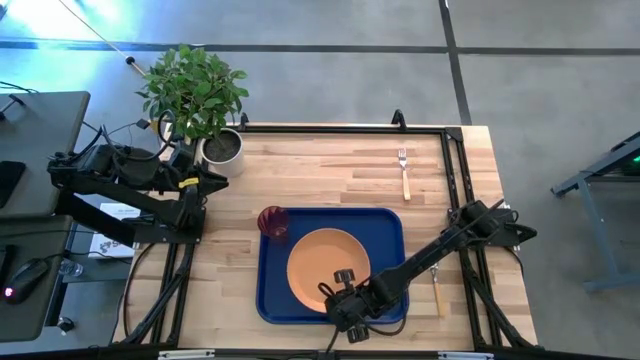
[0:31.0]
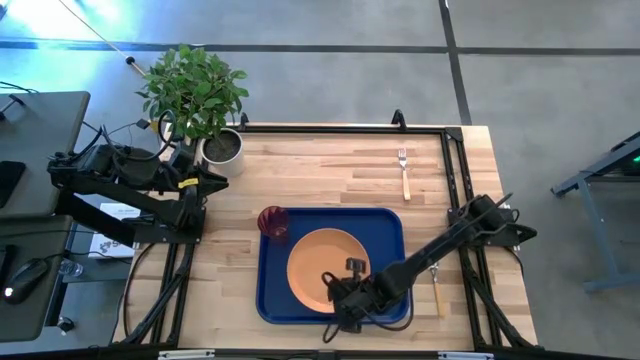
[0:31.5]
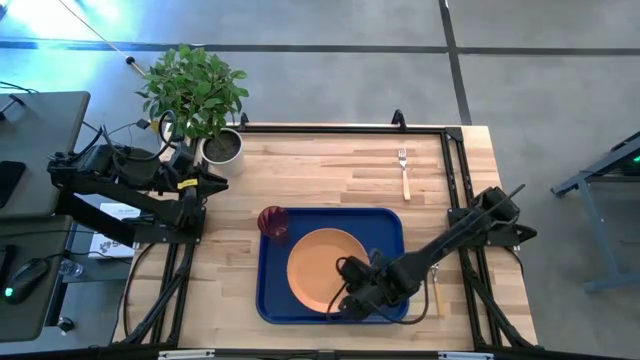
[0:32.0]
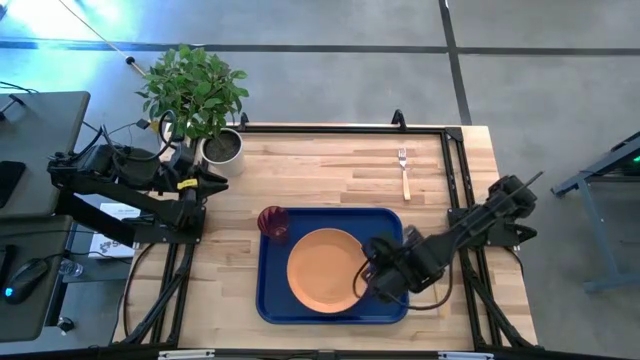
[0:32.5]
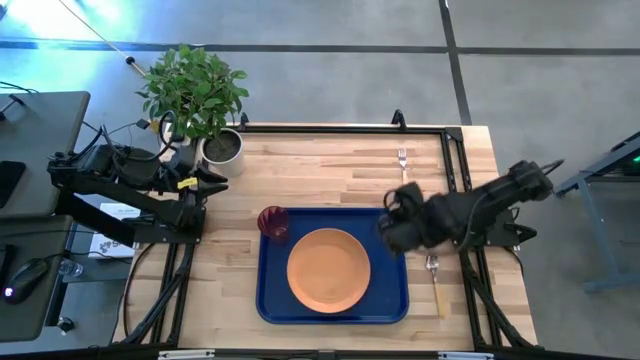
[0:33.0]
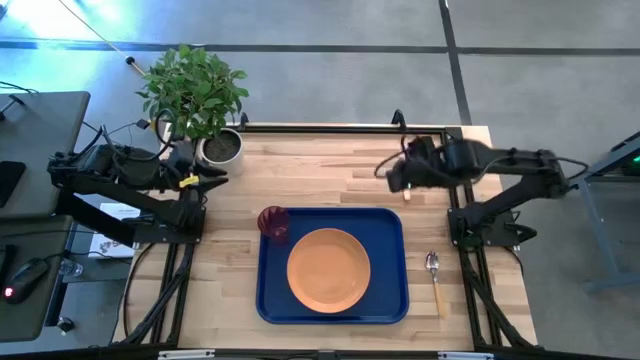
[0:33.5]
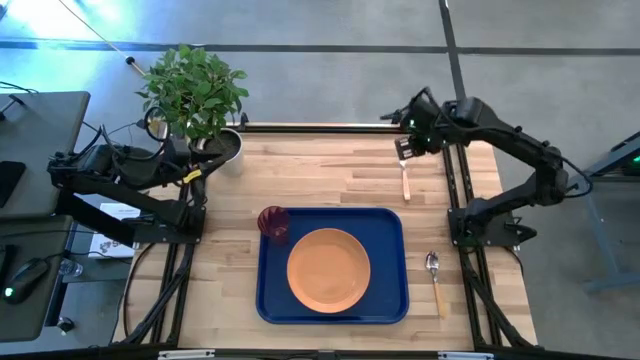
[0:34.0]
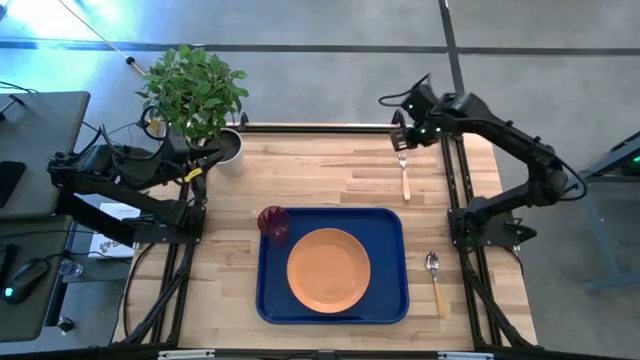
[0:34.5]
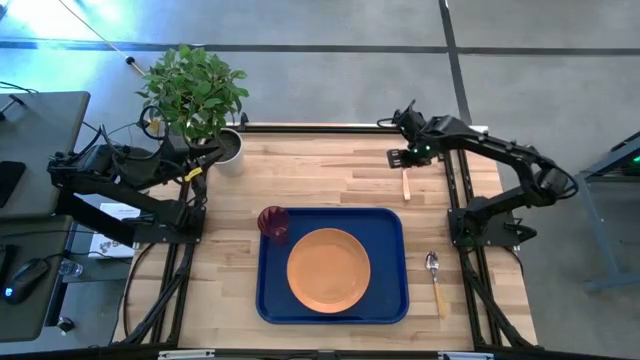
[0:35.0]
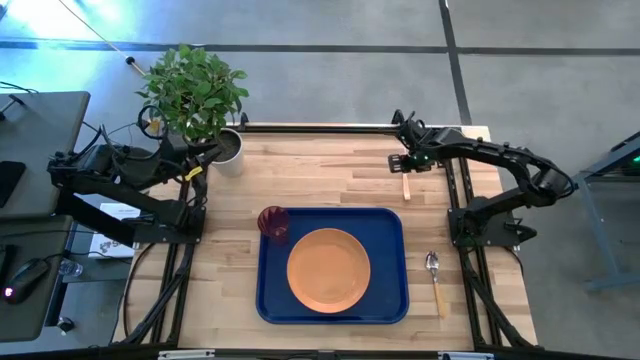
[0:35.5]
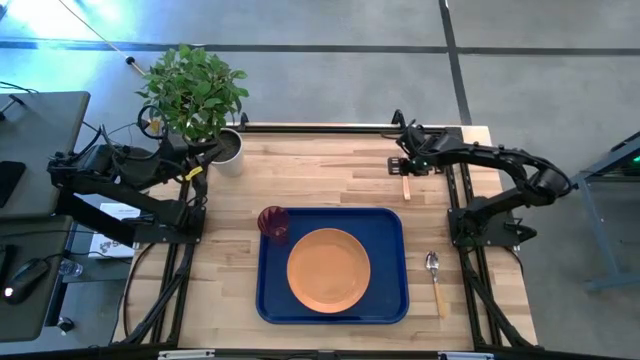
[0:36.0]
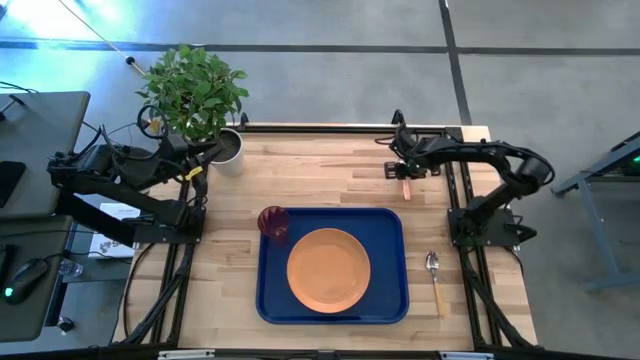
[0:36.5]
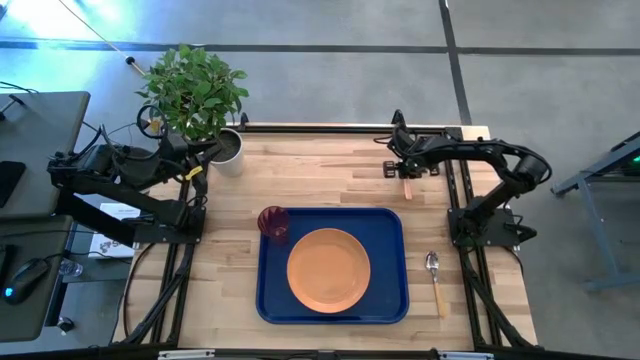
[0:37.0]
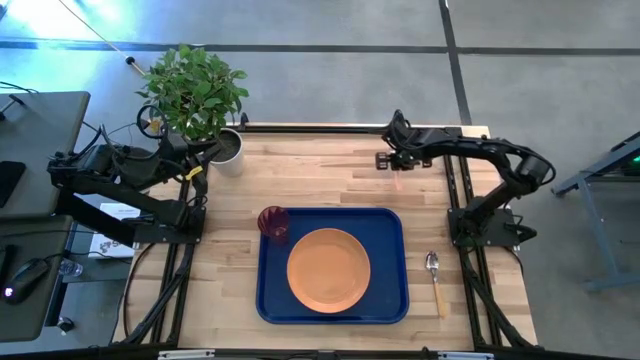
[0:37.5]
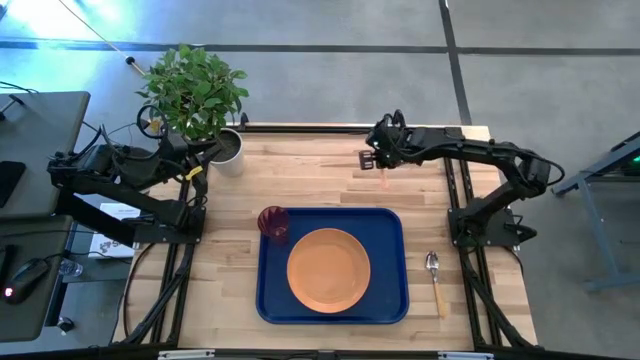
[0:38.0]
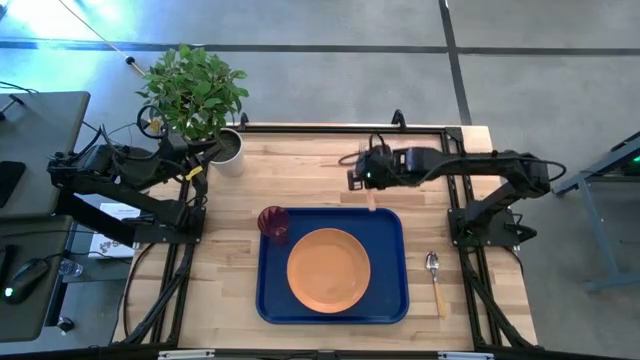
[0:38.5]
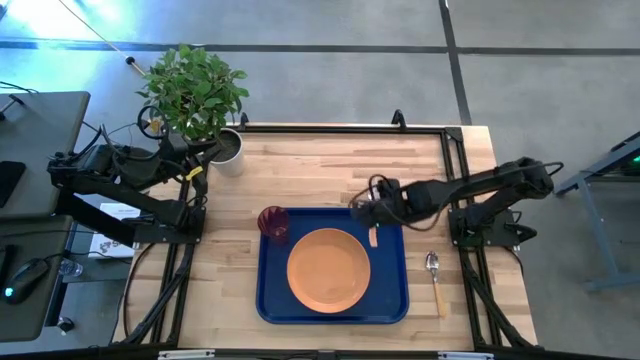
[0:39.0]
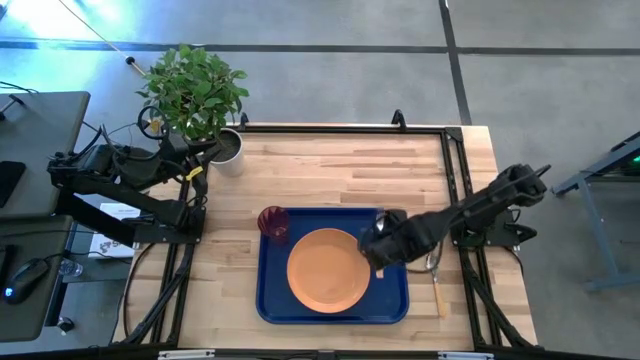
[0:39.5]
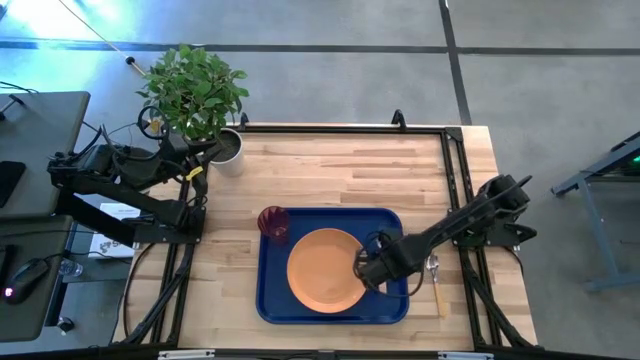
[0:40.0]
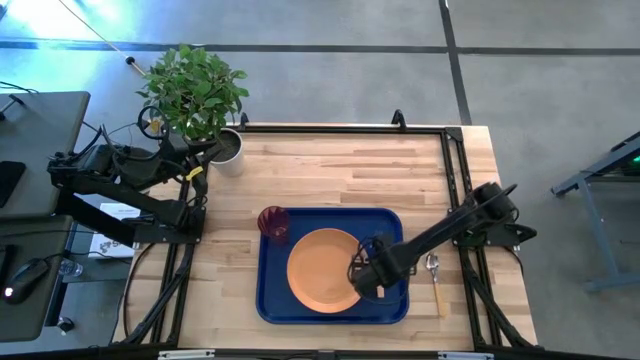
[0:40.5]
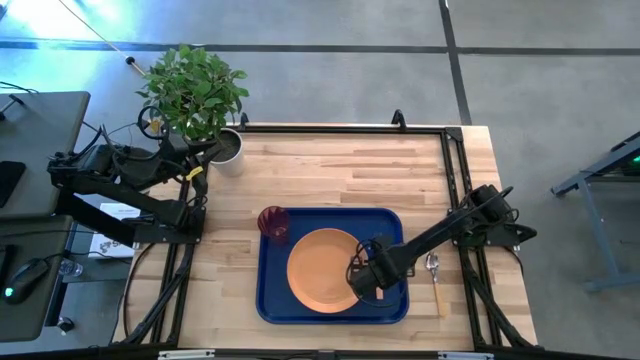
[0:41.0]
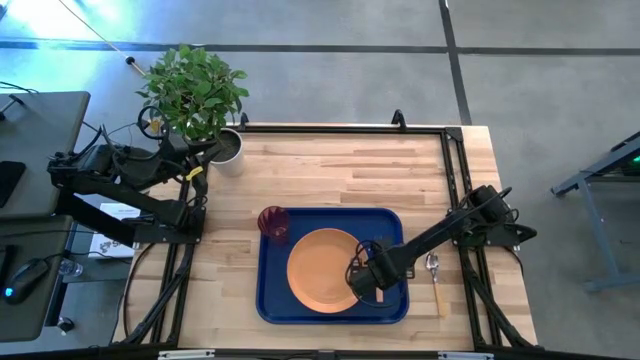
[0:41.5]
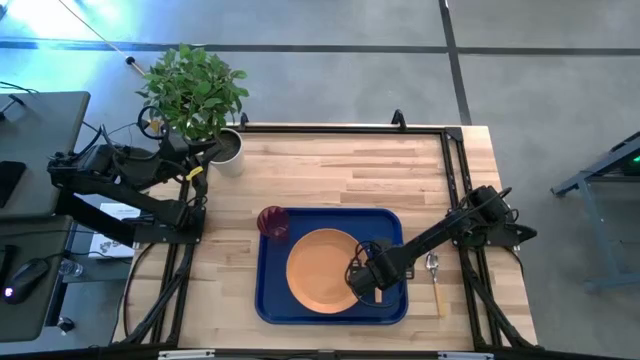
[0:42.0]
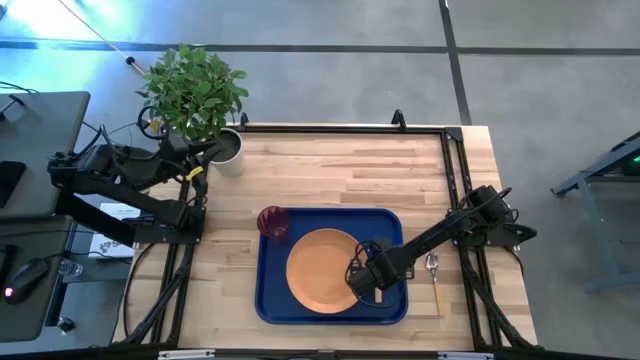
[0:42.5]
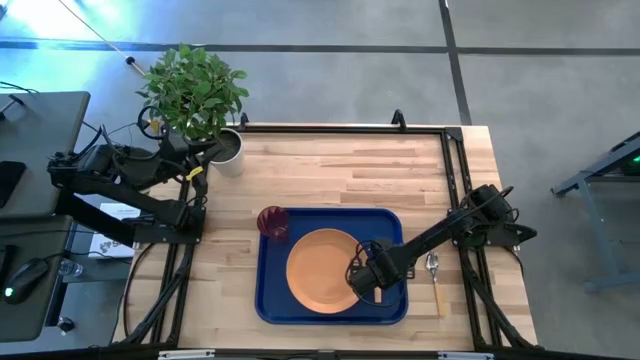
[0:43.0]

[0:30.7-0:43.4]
Task: Pick and place plate/cup/fork/spoon on tray
Put the light orange fork on the right side of the orange plate

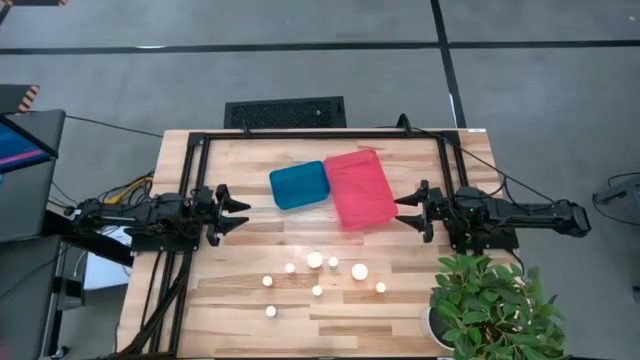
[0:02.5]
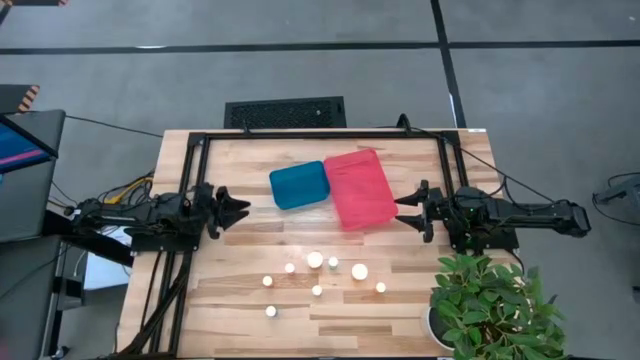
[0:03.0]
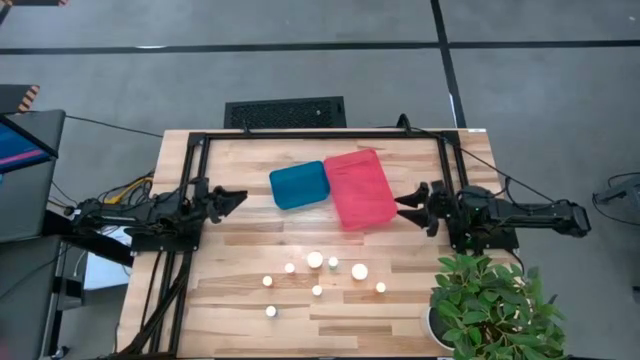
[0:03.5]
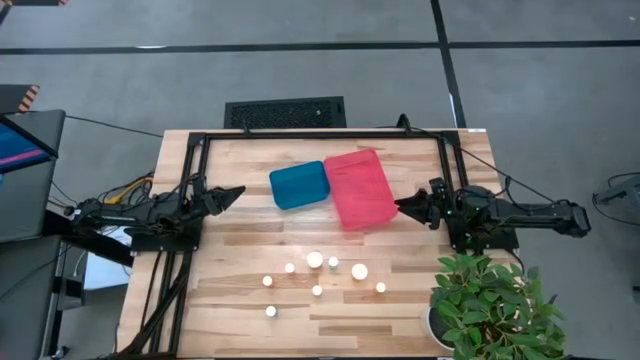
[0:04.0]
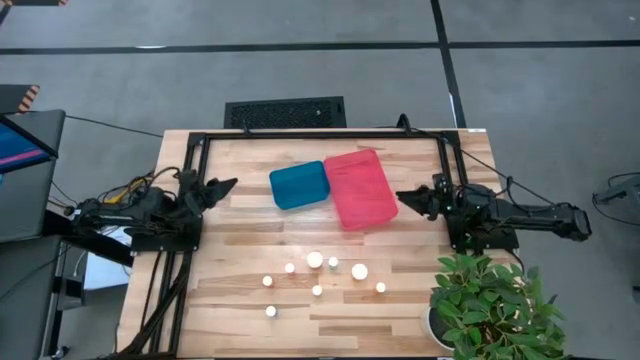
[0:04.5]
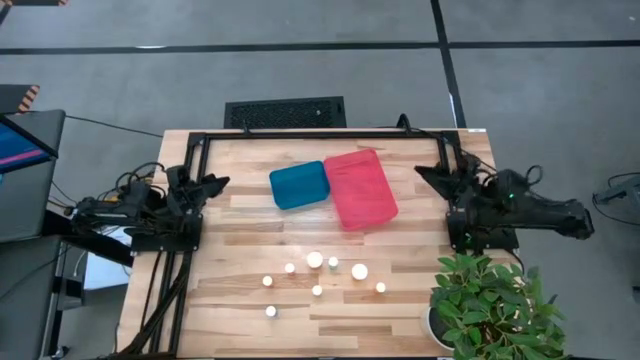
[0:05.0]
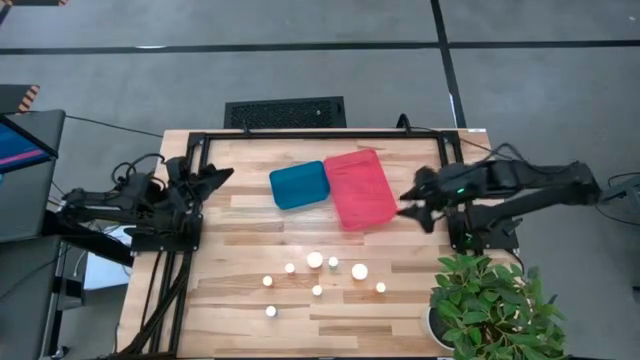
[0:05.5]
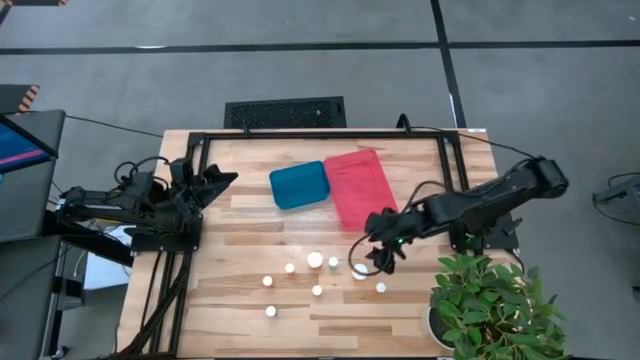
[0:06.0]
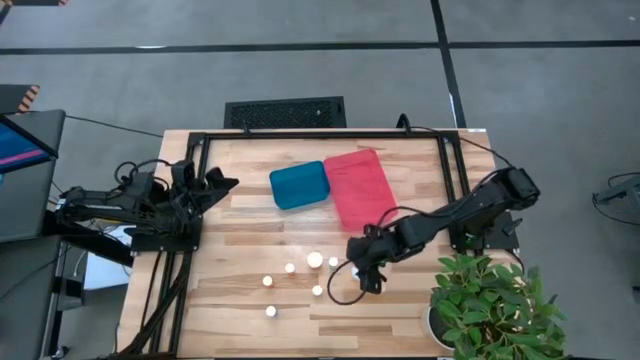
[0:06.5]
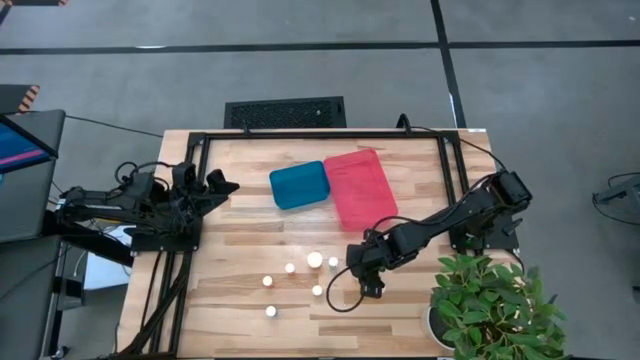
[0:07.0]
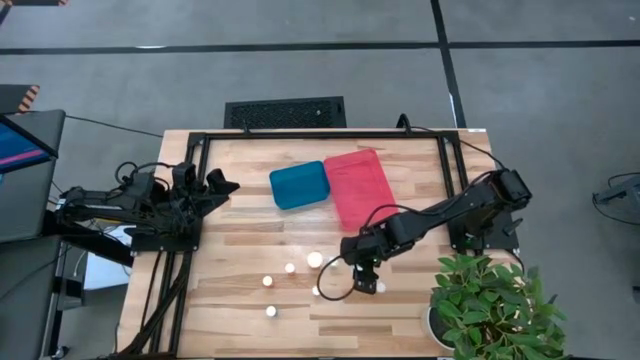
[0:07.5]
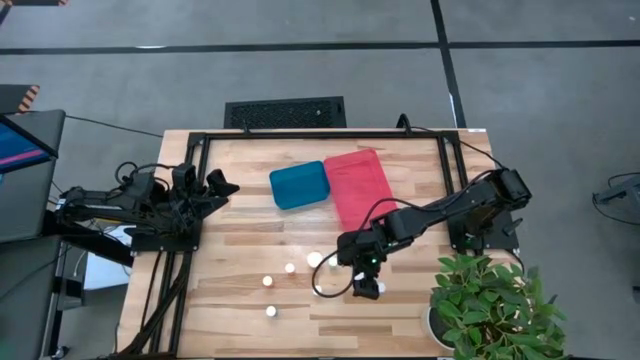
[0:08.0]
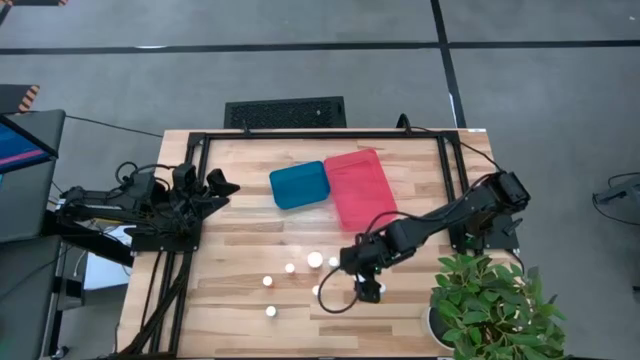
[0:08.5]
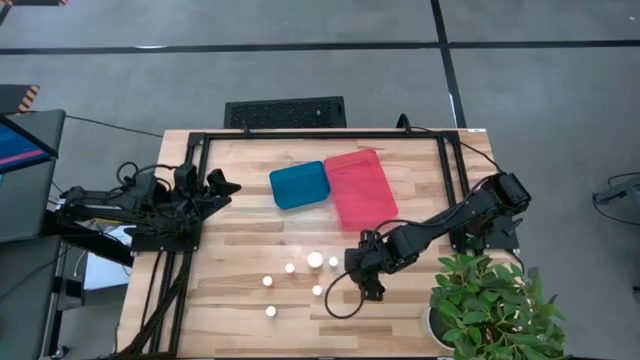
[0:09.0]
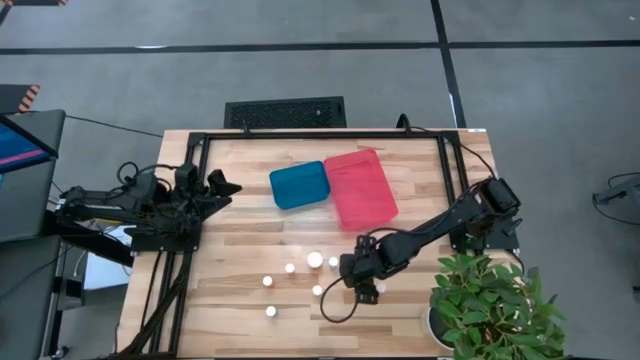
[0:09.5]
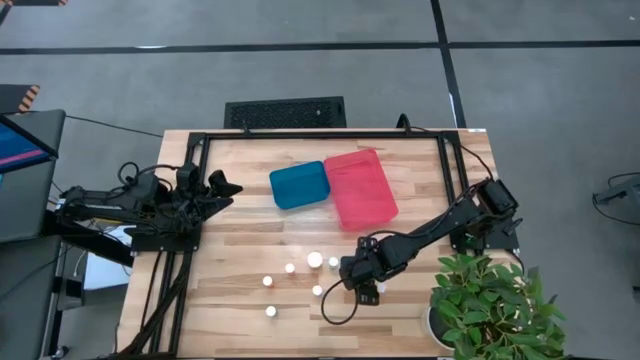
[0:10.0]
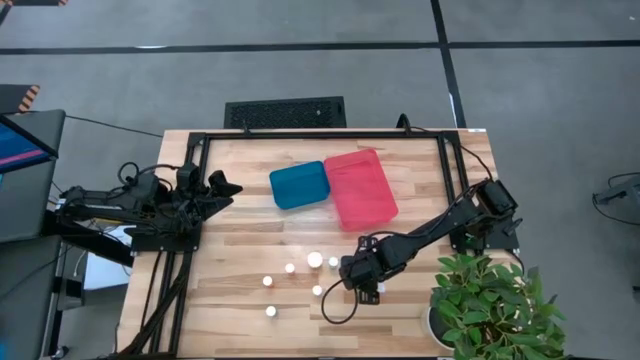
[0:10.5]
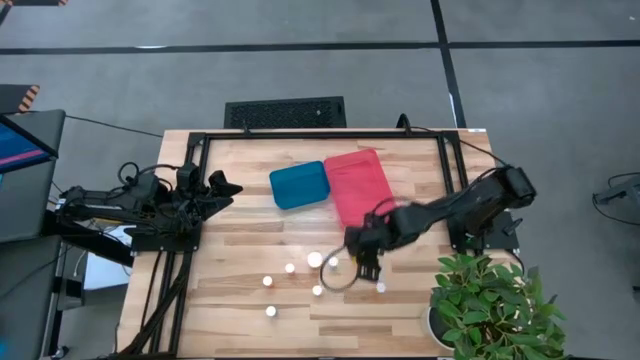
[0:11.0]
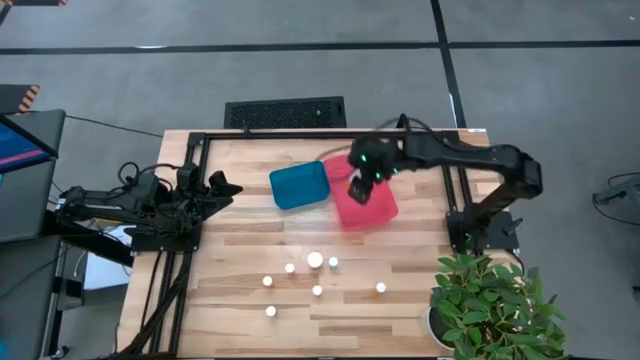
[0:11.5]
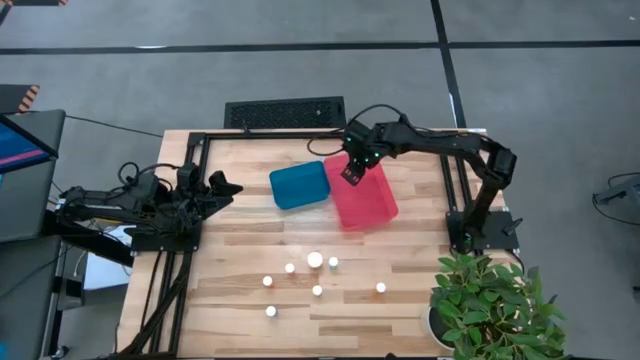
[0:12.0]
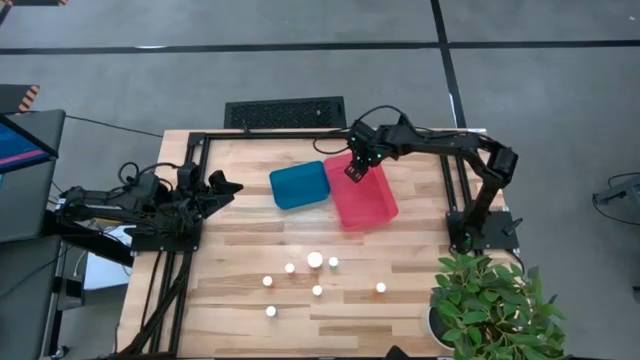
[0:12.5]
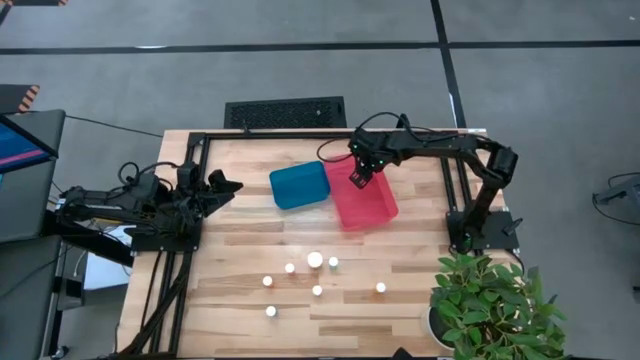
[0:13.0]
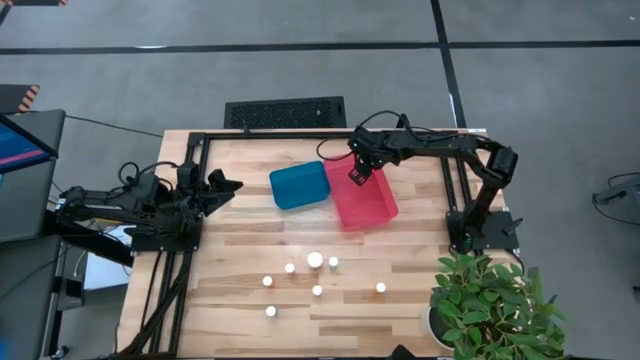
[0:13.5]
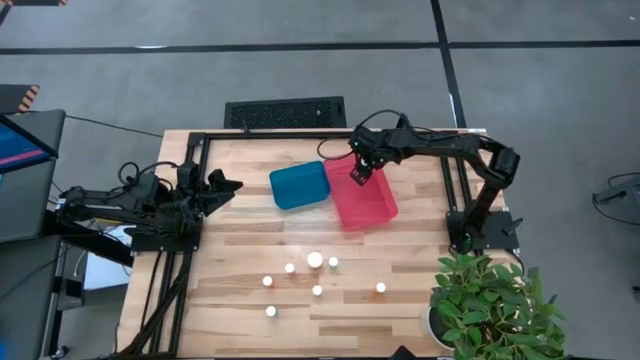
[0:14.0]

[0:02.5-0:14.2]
Task: Pick and place medicine bottles into bin by pill shape (circle, oval)
Put the right large orange pill bottle into the red bin
